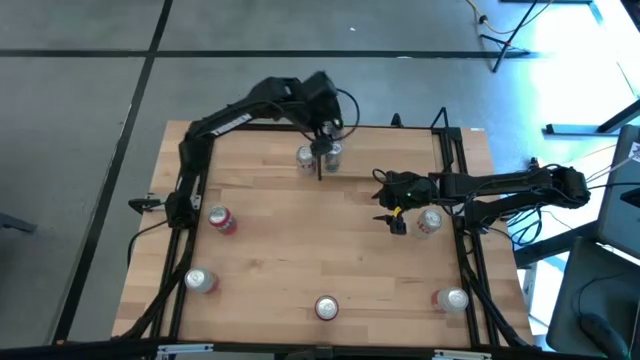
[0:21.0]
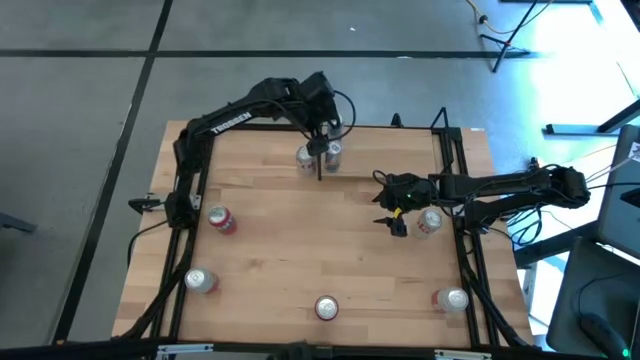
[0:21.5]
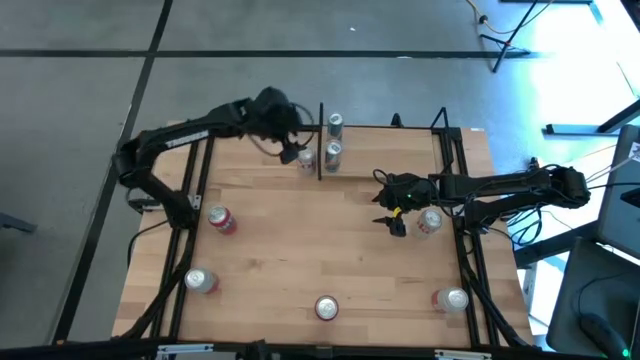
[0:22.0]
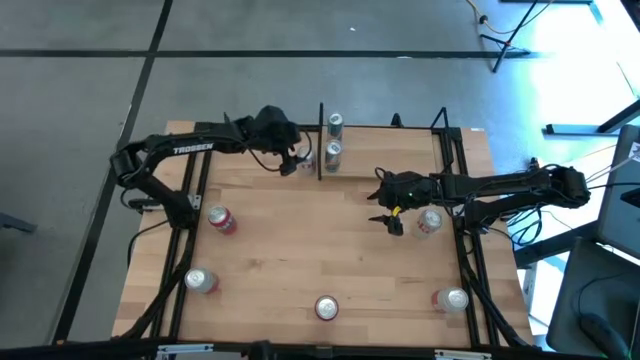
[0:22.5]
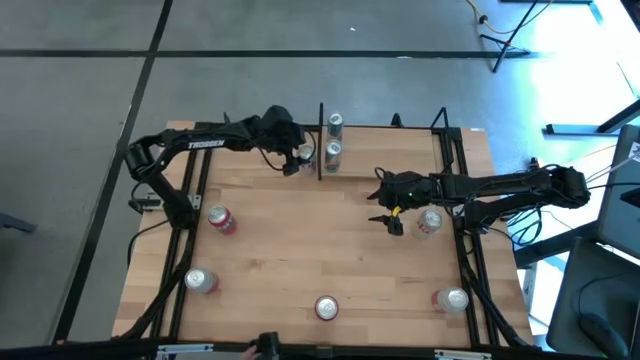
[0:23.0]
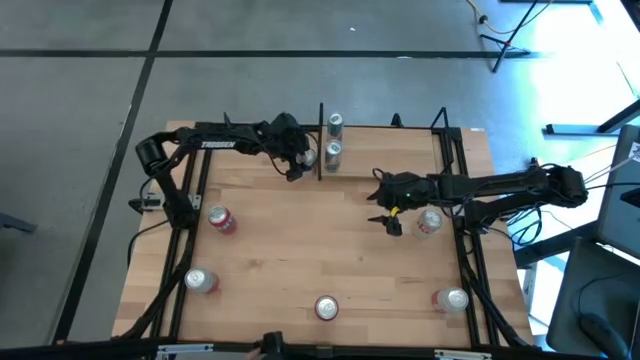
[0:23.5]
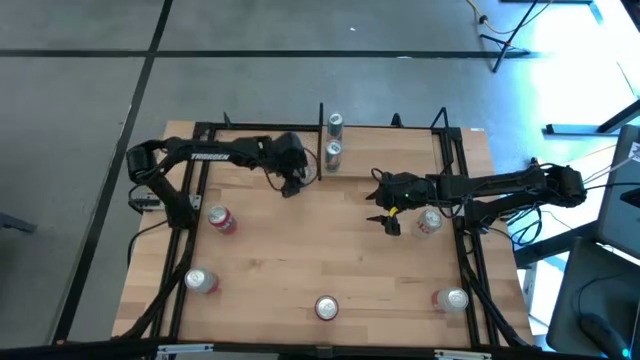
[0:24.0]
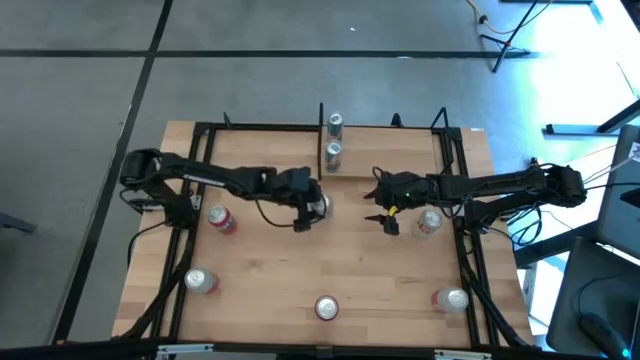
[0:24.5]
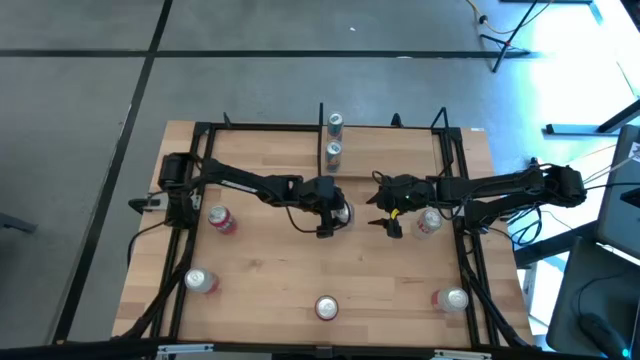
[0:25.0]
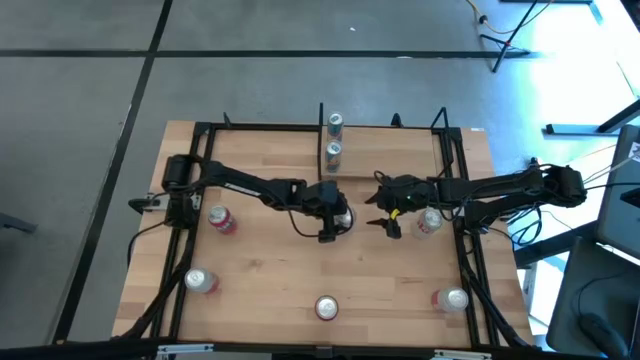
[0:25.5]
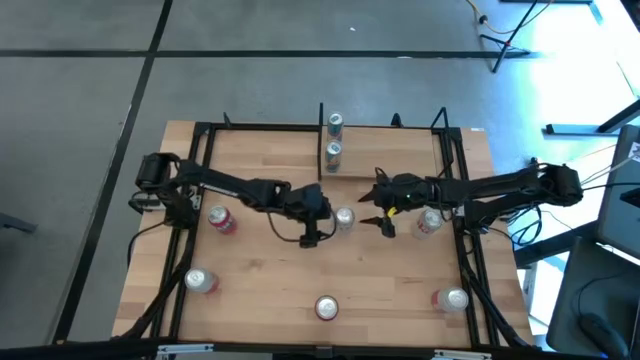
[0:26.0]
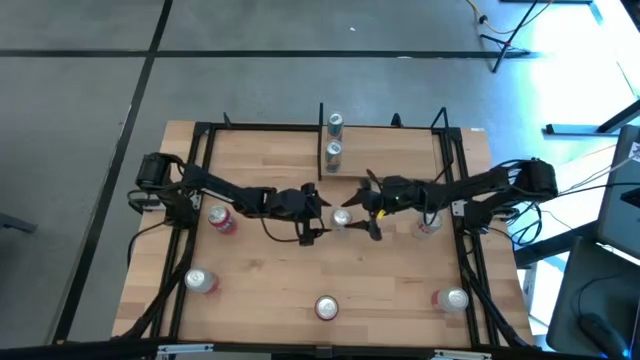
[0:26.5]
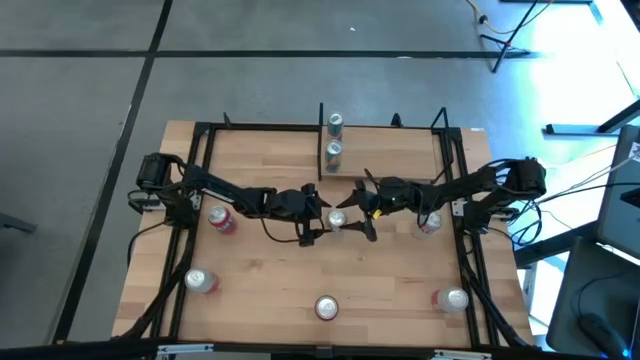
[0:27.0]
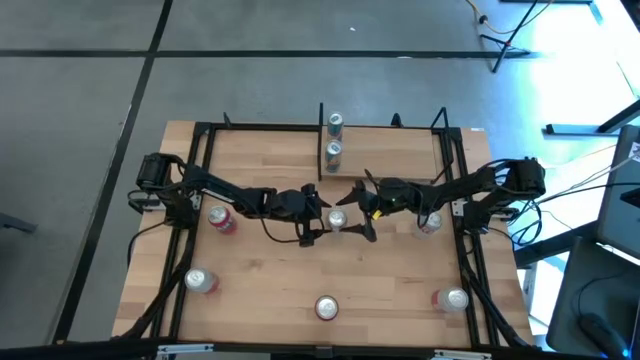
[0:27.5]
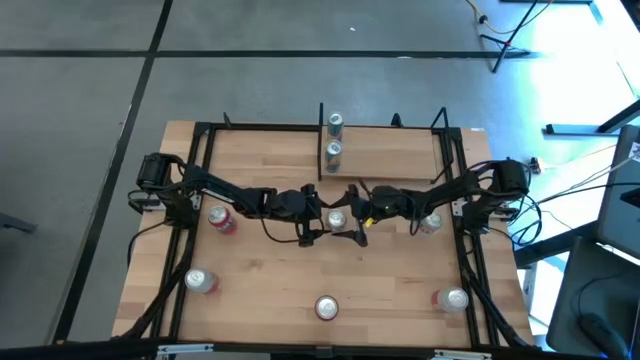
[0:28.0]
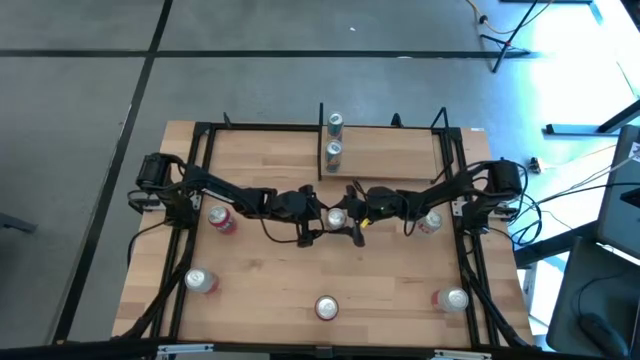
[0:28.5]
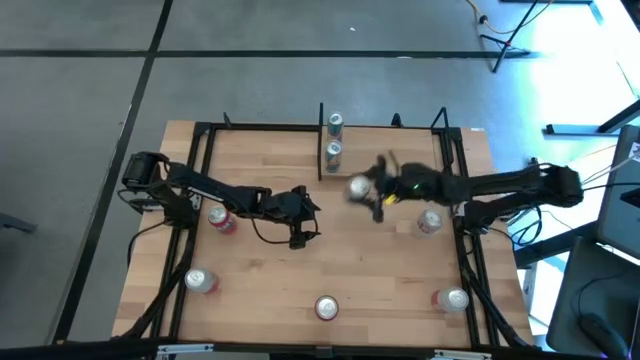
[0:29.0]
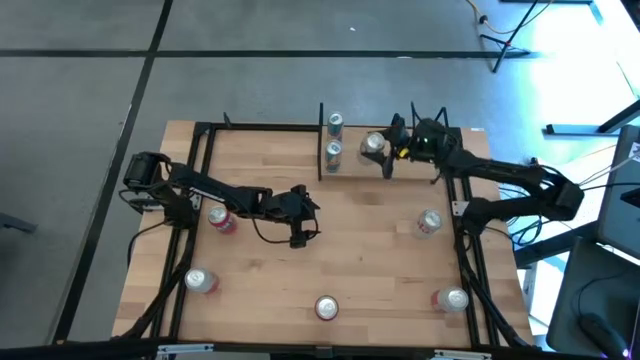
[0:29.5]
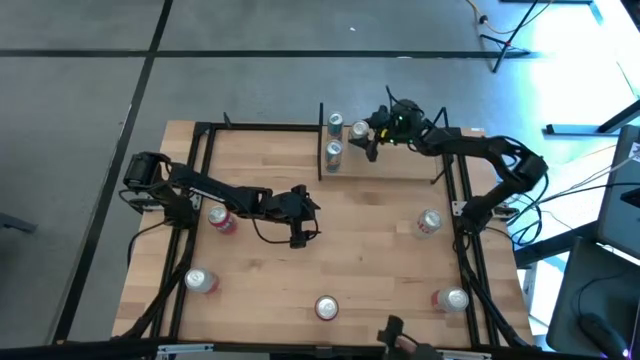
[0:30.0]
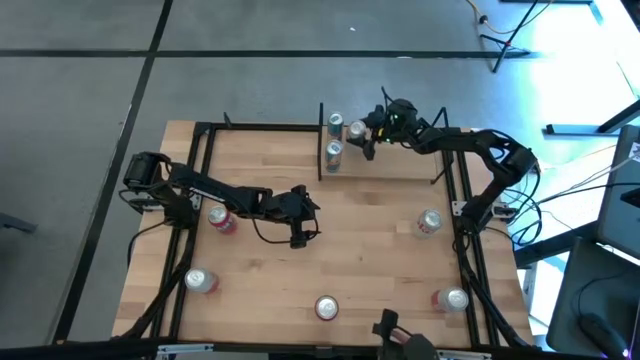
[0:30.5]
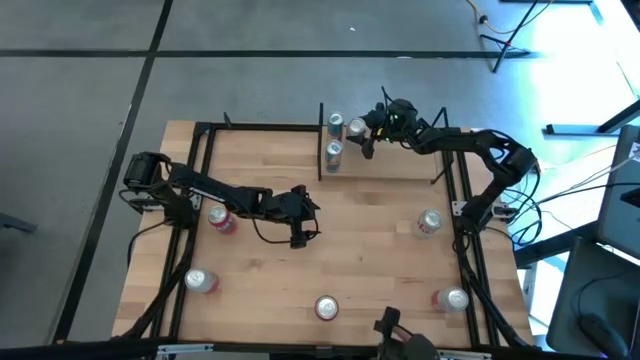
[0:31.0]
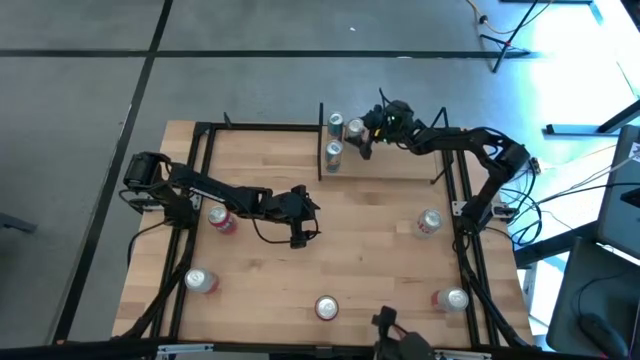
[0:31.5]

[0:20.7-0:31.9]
Task: Place canned beverage on shelf
Put the top red-silver soda can on the shelf

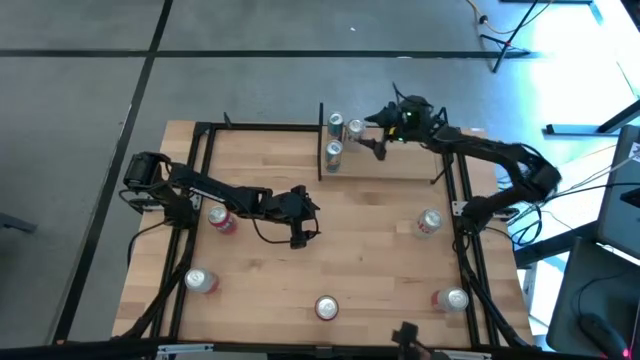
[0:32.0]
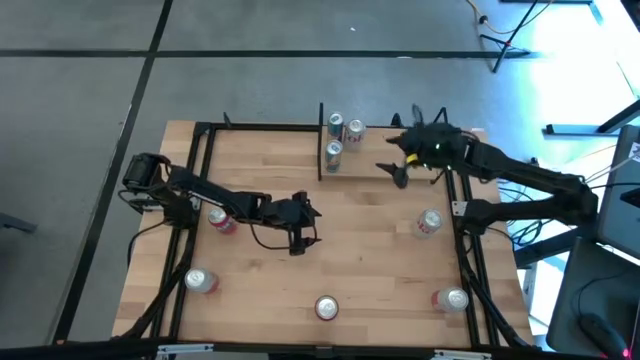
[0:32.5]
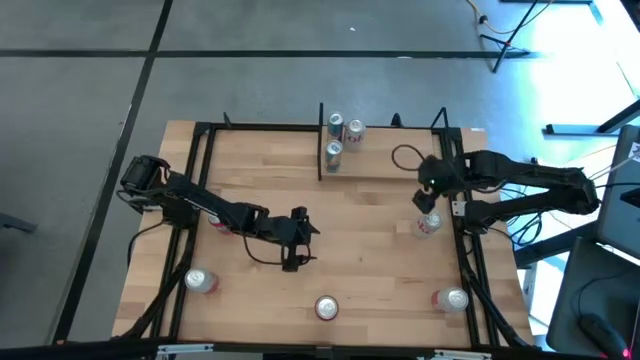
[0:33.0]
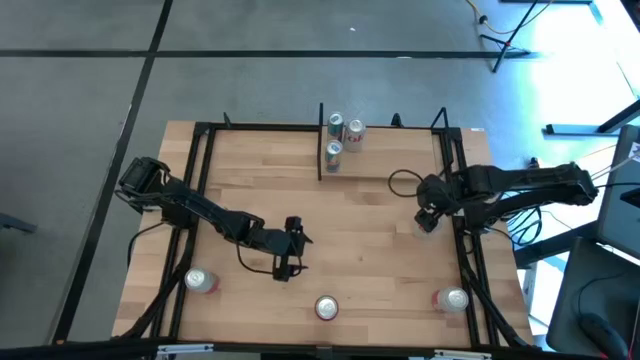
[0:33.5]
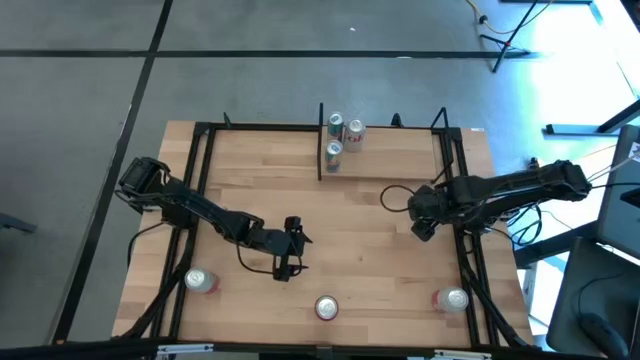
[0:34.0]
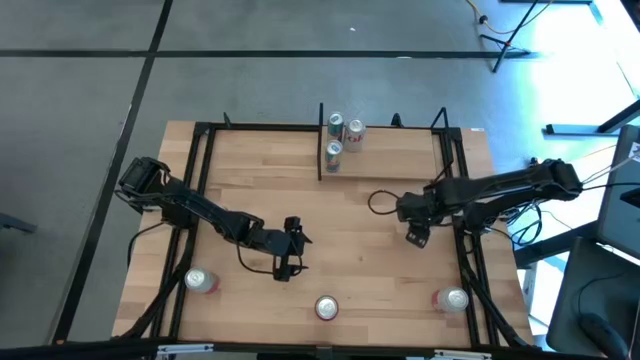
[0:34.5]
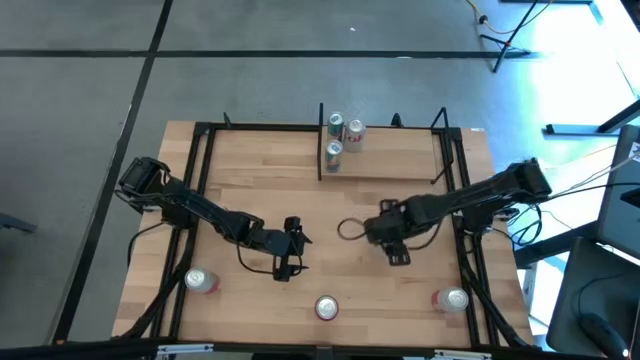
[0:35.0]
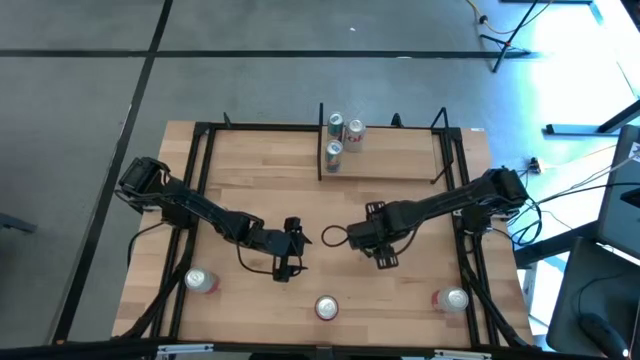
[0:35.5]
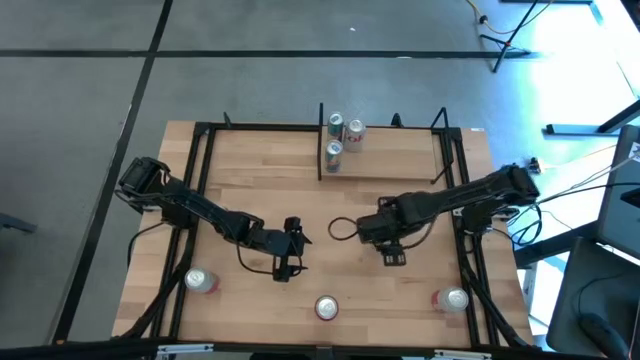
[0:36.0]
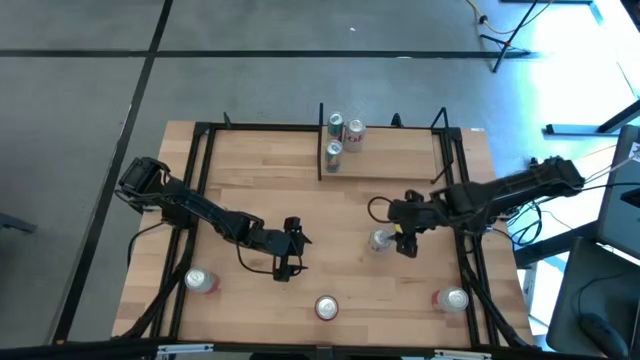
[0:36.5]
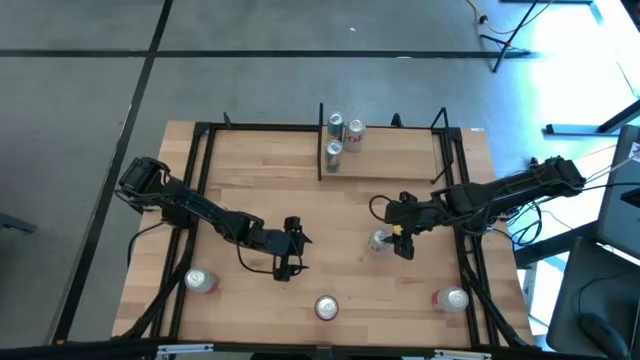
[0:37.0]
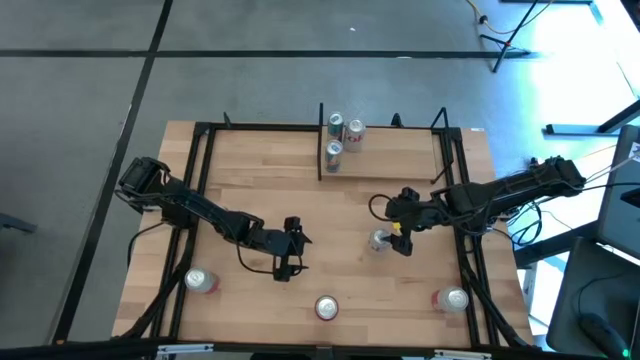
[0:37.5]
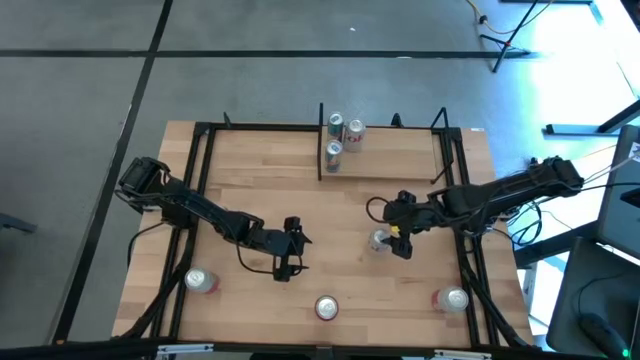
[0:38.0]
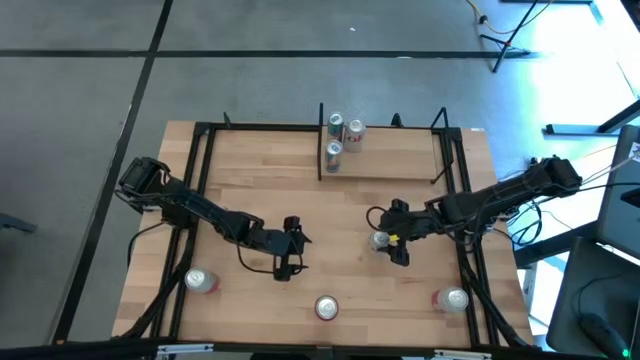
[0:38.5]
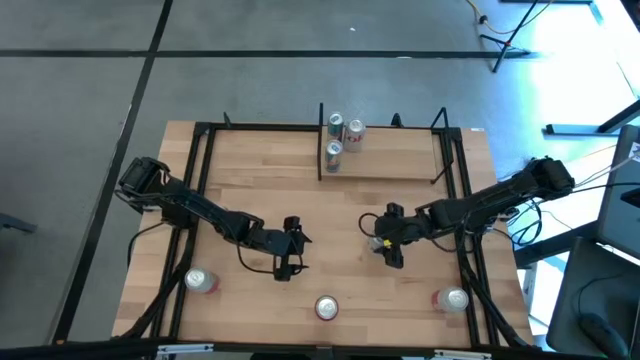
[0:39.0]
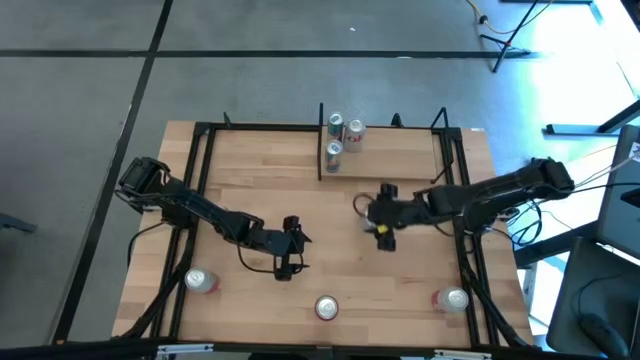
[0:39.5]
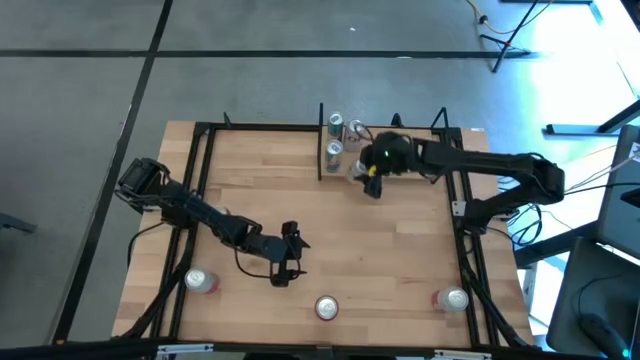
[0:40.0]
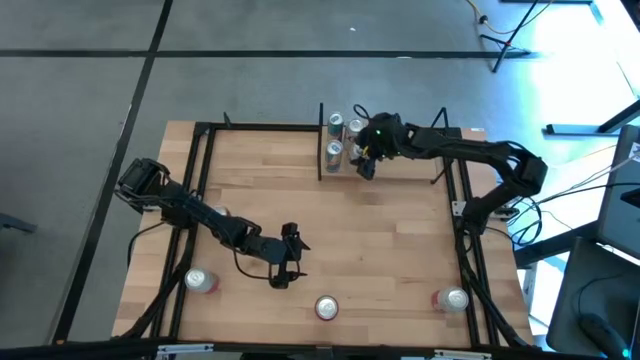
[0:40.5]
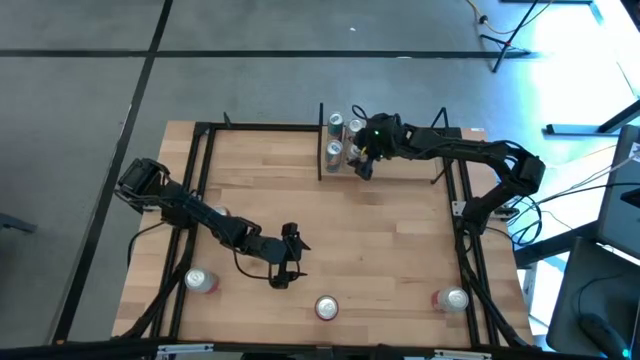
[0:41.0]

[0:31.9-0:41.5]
Put the red-silver soda can aligned with the other red-silver soda can on the shelf

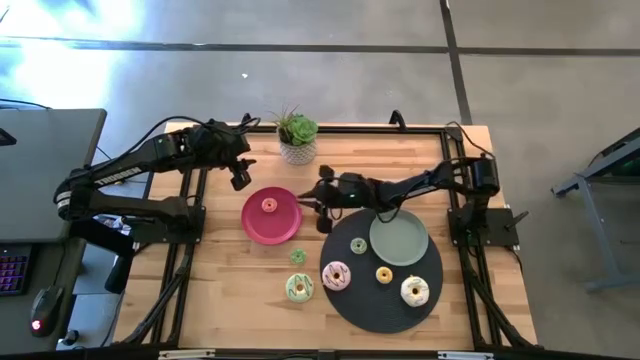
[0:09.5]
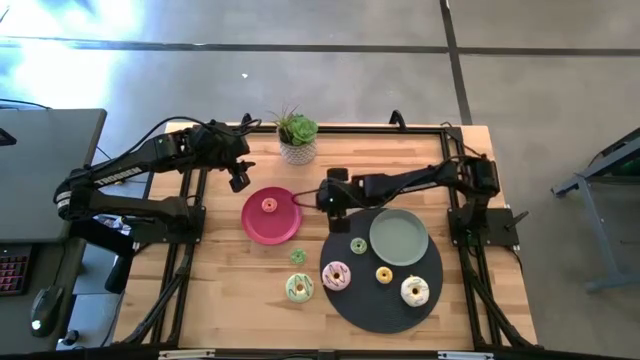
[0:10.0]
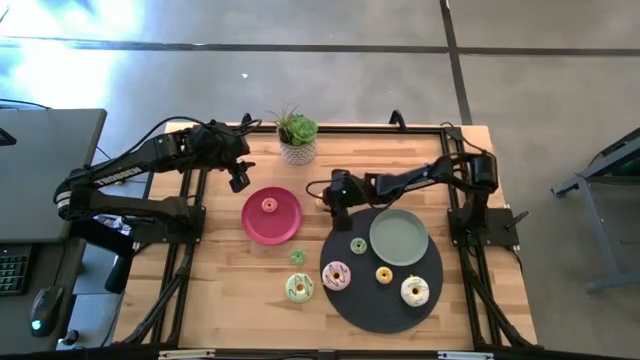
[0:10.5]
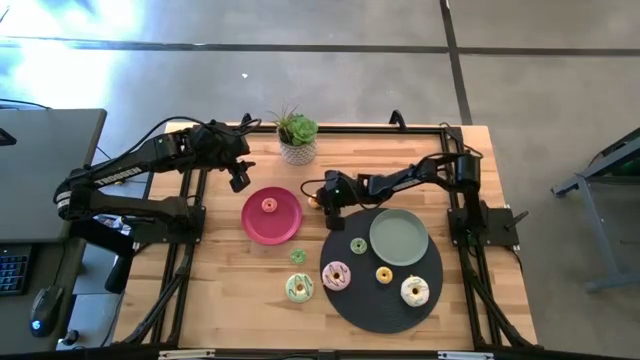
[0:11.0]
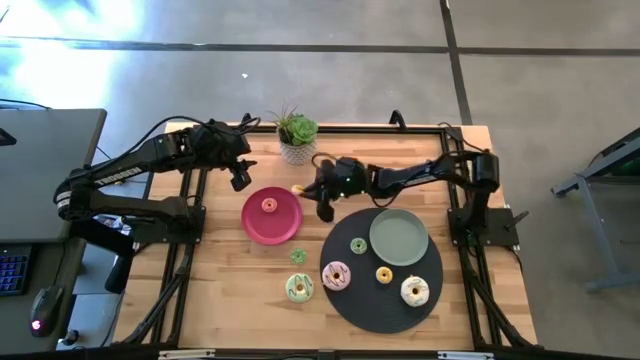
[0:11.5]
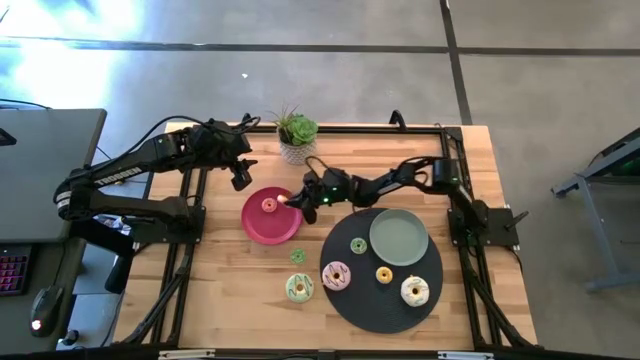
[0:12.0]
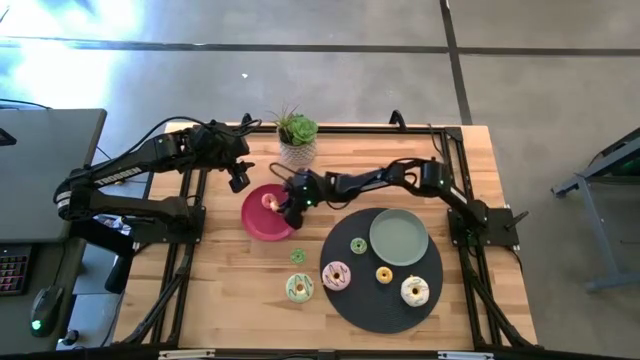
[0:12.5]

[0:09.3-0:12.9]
Task: Pick & Place donuts
Put the small pink donut on the pink plate
